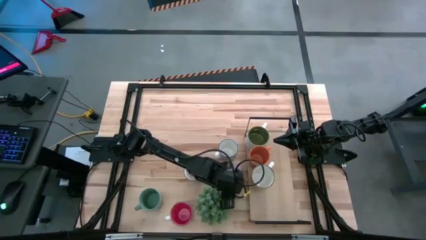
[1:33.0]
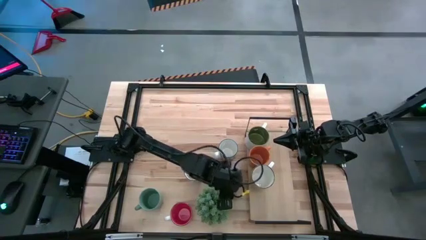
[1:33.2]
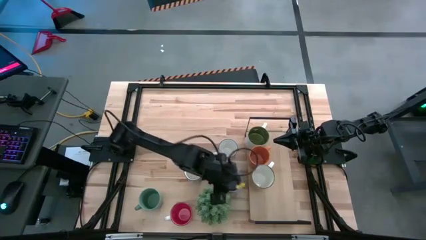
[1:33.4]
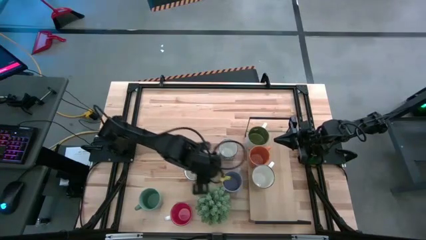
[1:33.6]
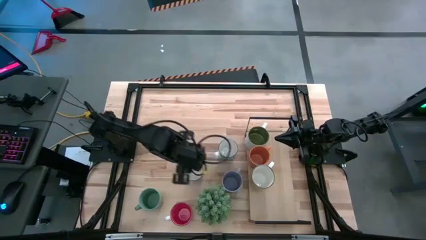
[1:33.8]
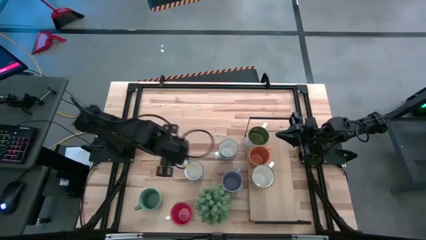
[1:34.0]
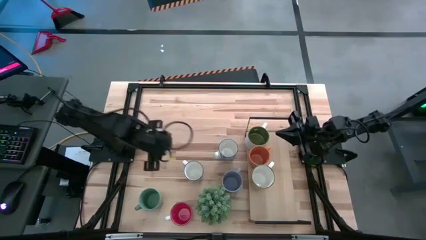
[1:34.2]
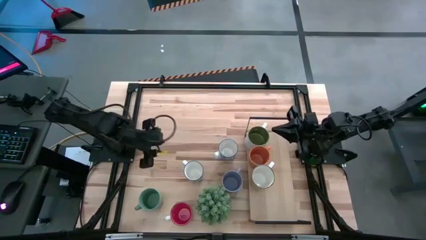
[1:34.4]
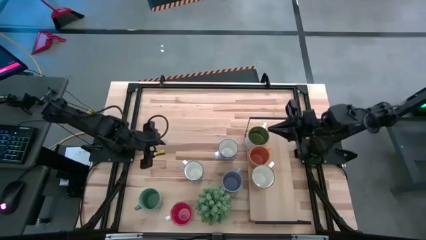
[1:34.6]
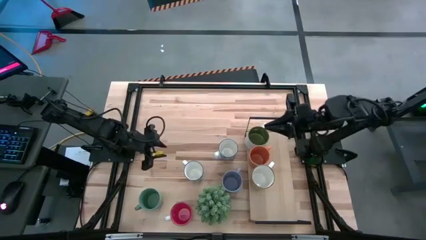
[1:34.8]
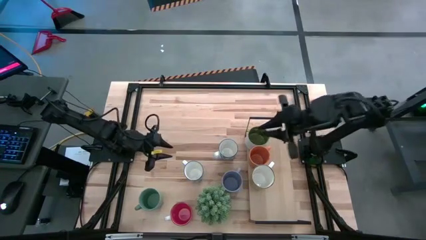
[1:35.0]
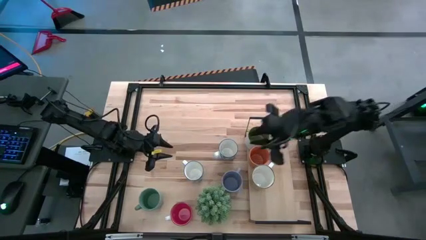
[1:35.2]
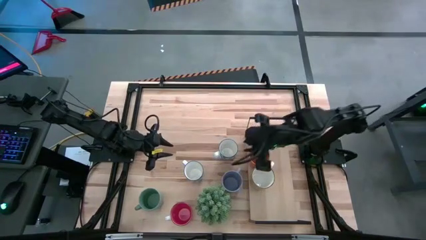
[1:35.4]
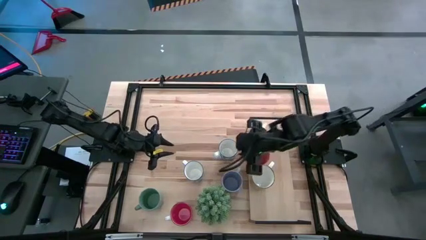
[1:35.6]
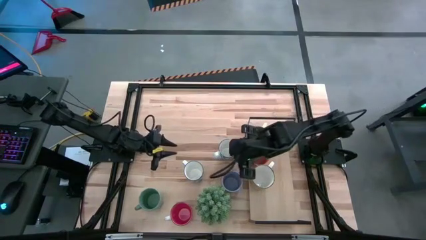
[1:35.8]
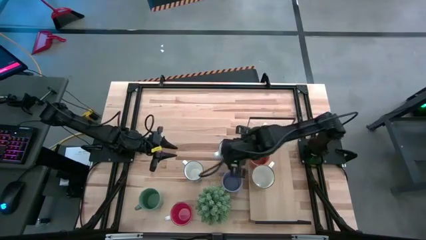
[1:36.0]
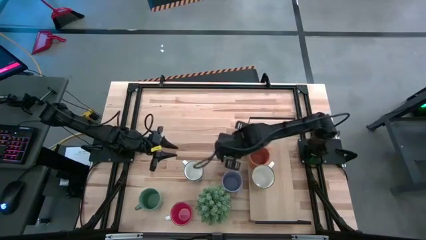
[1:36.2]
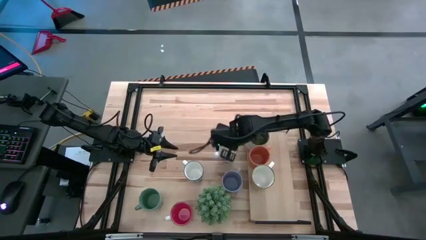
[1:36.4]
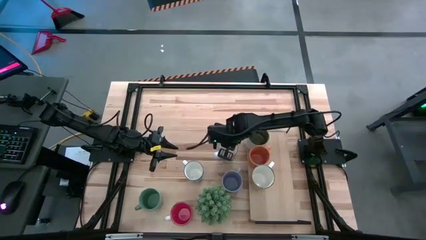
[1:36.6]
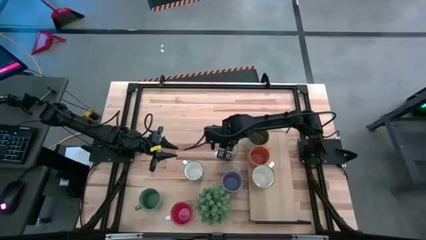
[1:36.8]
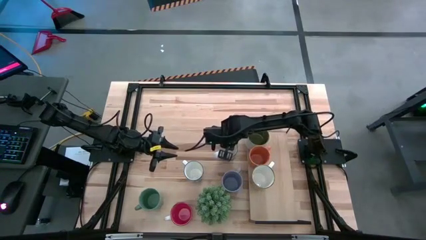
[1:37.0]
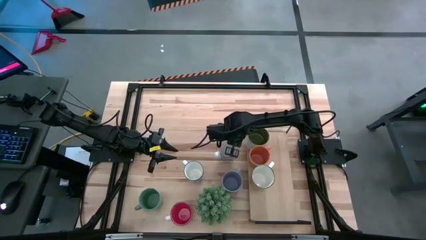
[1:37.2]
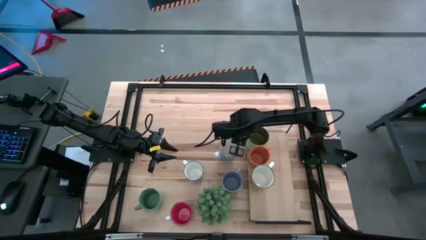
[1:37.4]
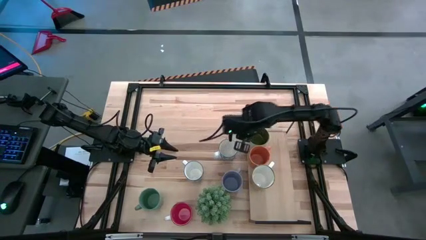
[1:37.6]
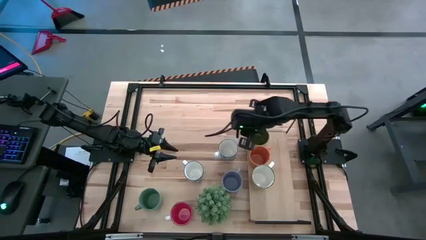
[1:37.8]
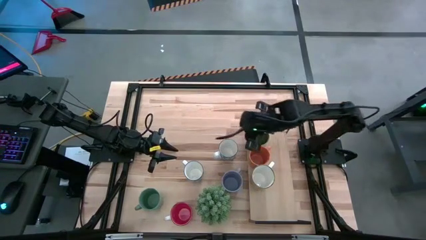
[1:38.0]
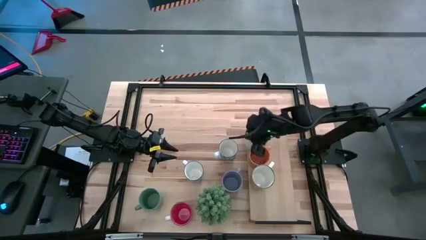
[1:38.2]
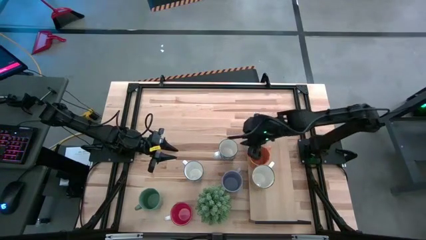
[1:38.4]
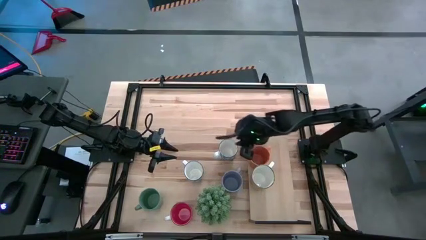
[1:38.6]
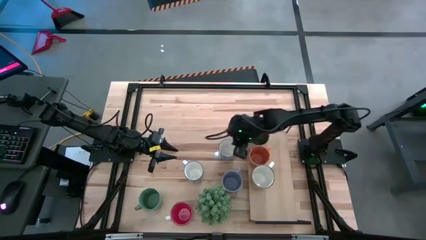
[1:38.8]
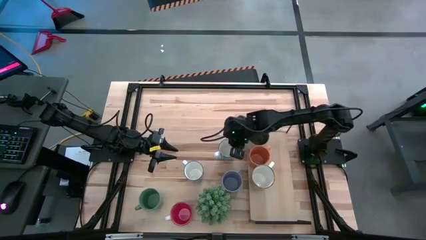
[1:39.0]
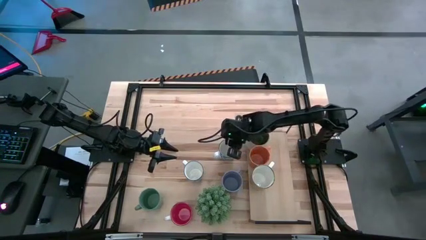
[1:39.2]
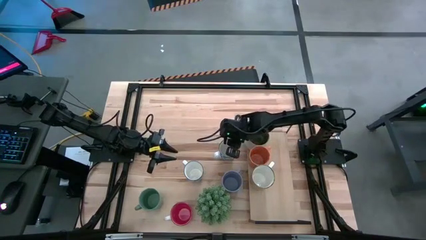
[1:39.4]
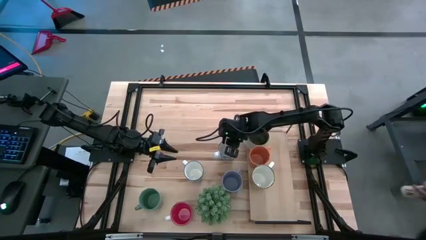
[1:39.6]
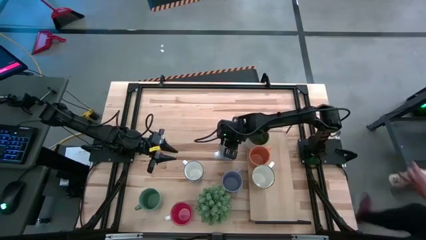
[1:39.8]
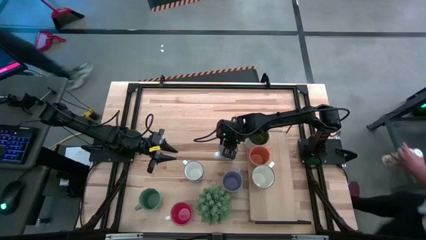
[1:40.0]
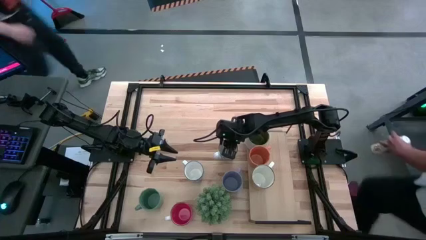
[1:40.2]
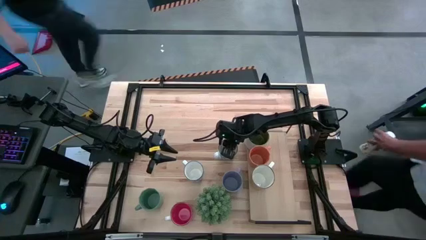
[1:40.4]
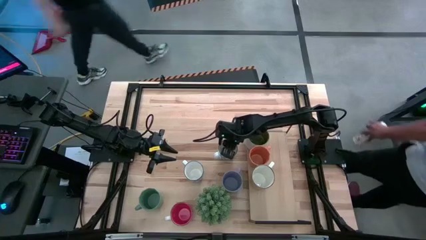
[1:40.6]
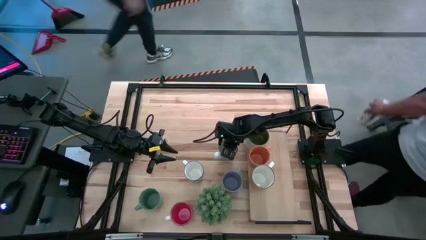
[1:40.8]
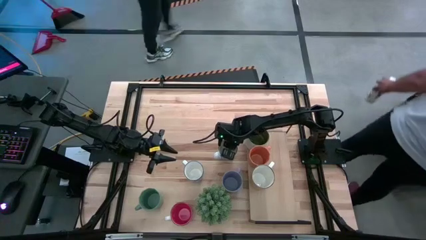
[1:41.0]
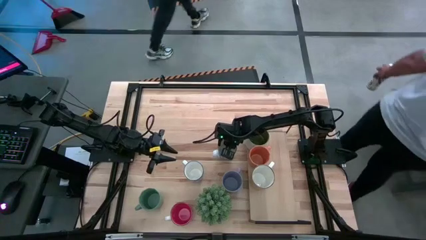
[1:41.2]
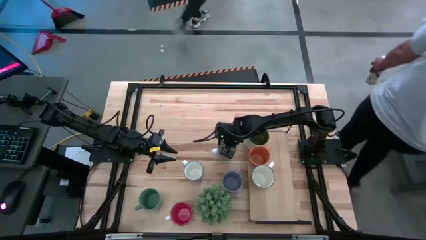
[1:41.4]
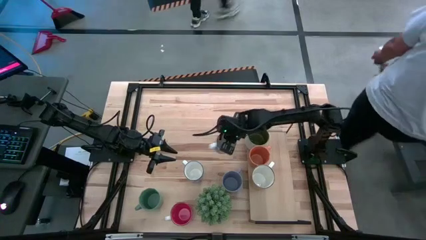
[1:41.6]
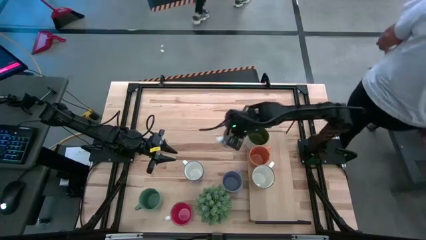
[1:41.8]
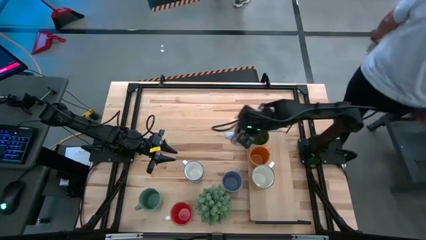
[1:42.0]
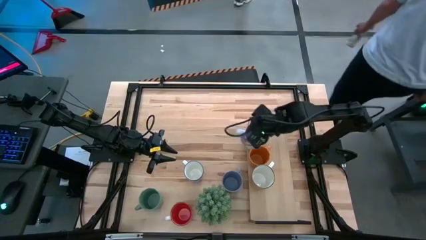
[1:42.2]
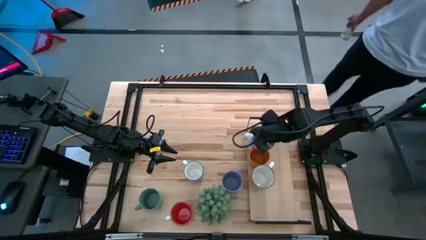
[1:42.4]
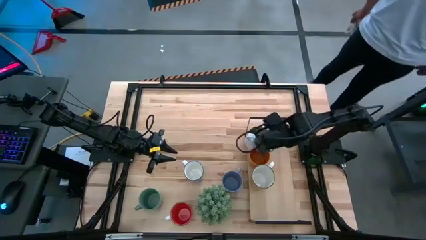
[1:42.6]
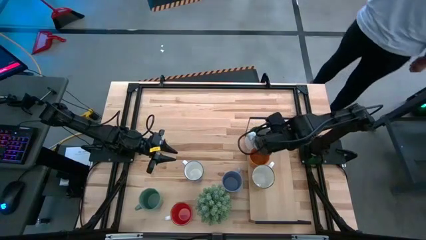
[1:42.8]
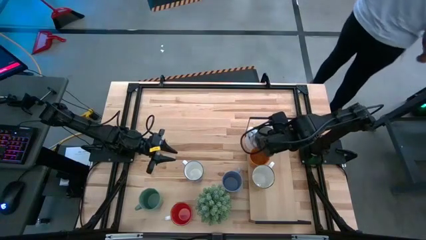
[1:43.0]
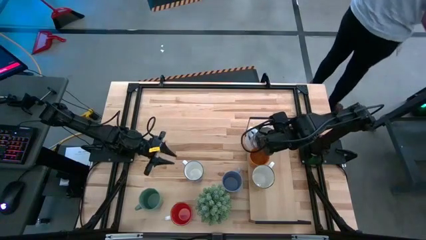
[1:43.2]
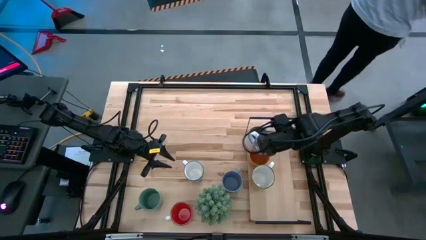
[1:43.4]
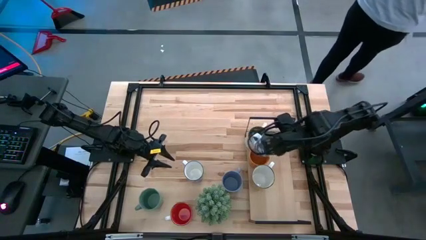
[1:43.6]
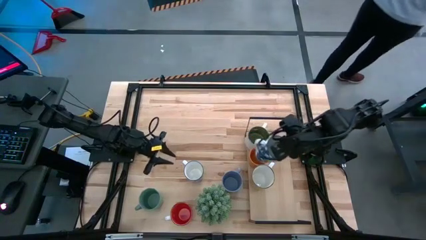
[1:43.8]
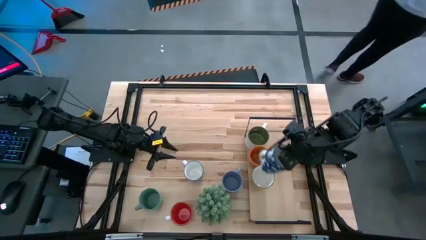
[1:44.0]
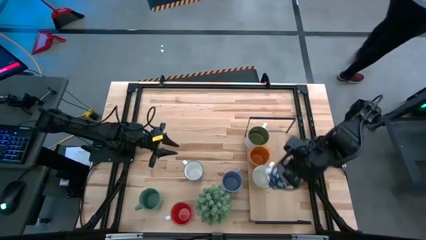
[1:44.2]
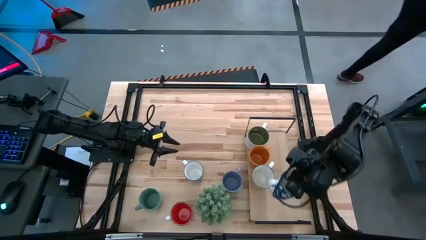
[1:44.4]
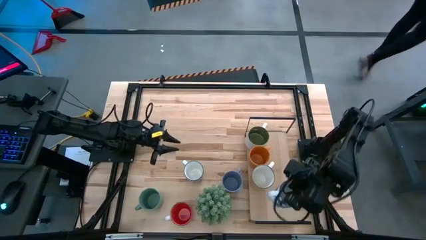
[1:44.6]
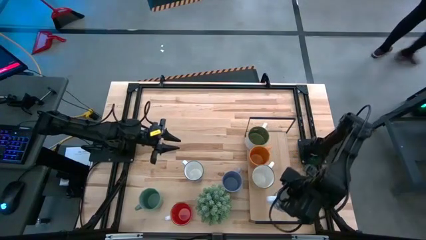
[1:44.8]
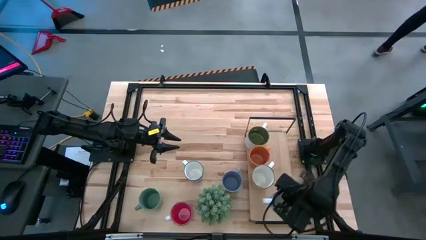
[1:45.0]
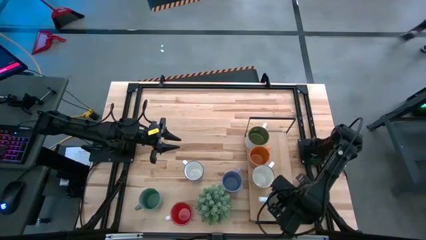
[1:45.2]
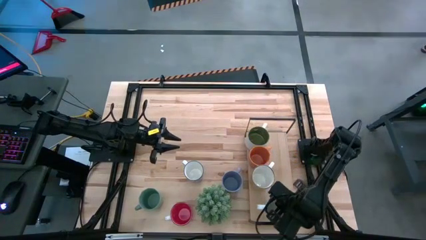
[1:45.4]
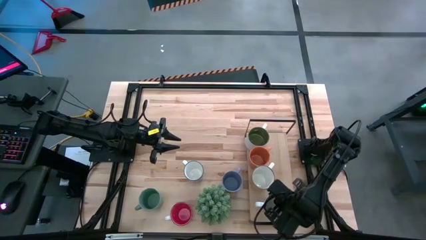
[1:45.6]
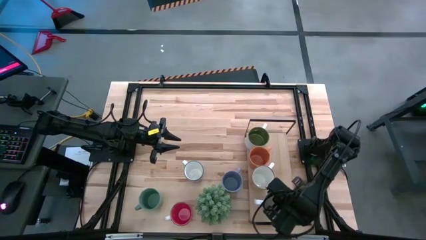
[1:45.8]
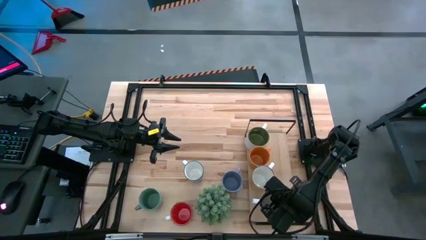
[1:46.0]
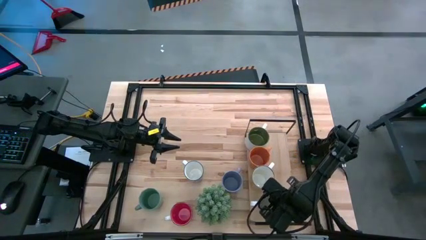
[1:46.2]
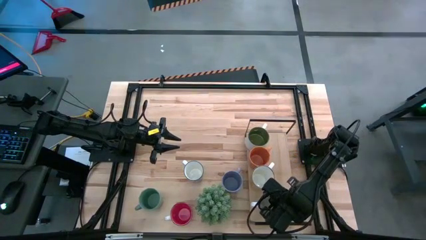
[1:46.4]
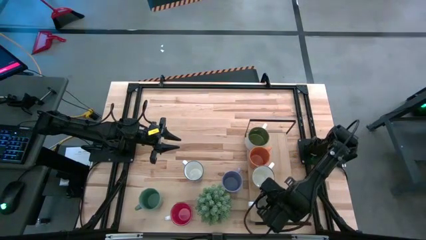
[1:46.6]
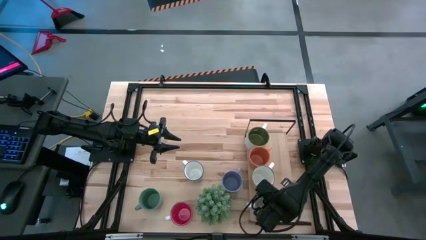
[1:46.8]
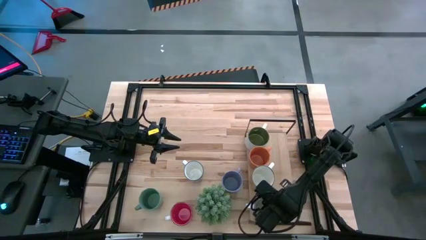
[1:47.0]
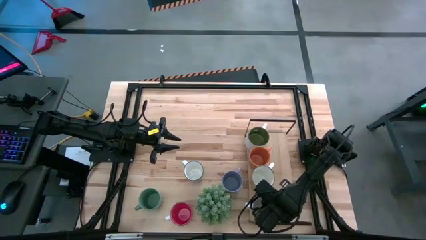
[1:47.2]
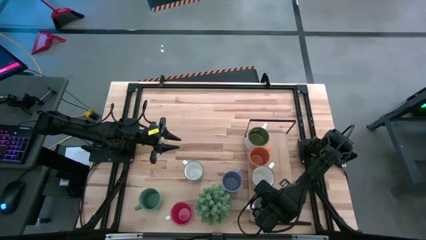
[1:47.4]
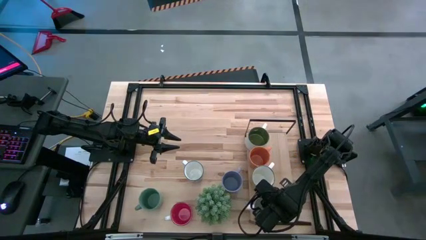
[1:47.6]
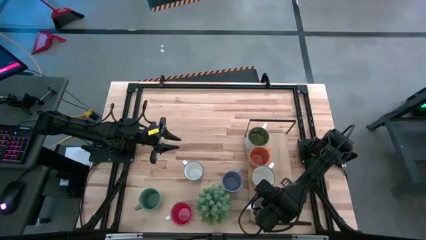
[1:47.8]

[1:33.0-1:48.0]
Task: Place coffee mugs
Put the right blue mug on the shelf
